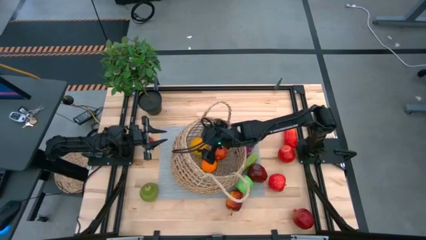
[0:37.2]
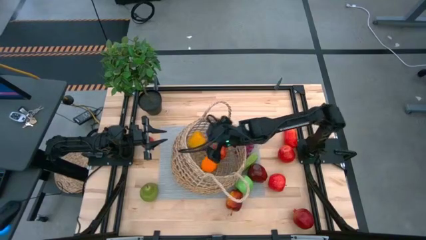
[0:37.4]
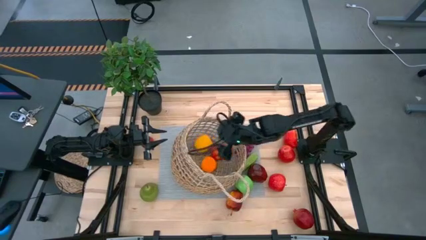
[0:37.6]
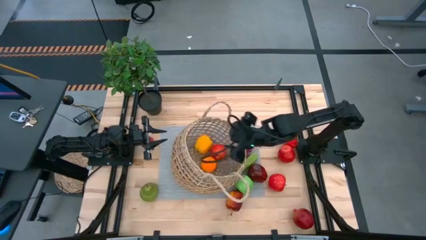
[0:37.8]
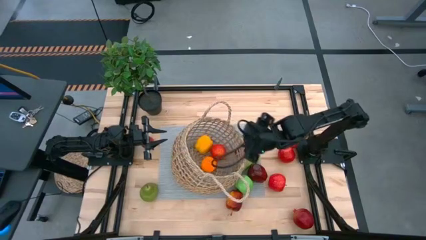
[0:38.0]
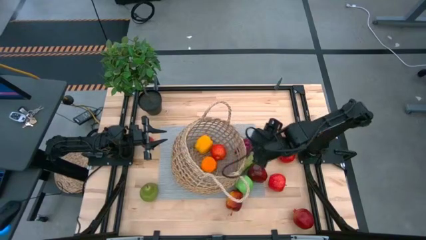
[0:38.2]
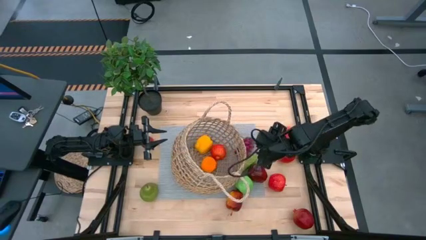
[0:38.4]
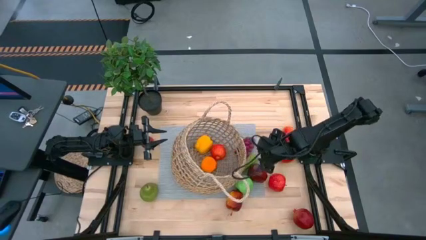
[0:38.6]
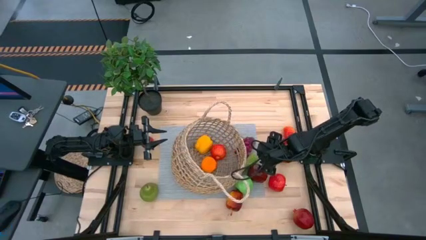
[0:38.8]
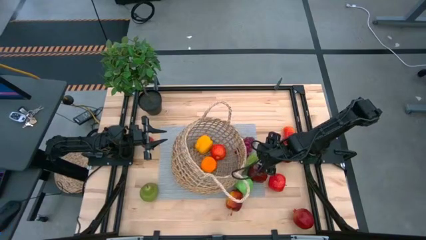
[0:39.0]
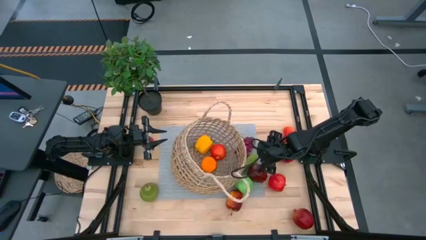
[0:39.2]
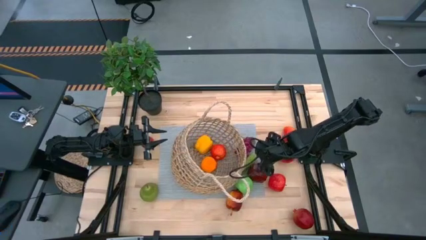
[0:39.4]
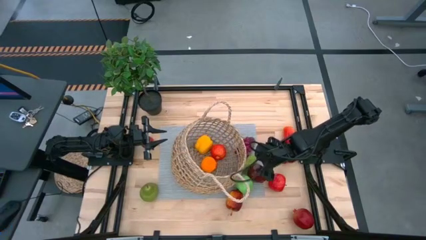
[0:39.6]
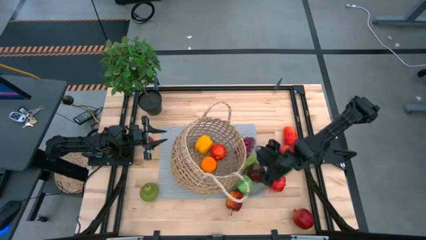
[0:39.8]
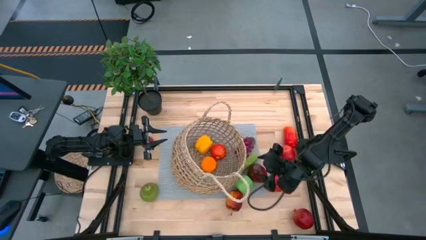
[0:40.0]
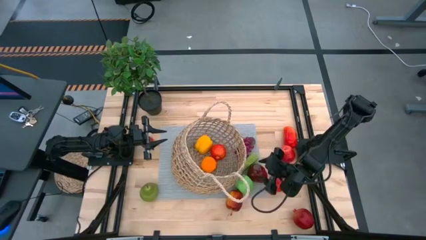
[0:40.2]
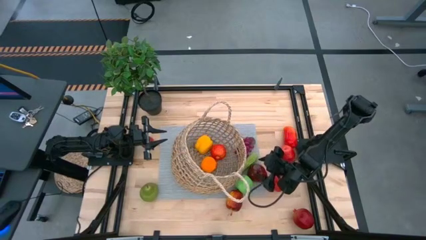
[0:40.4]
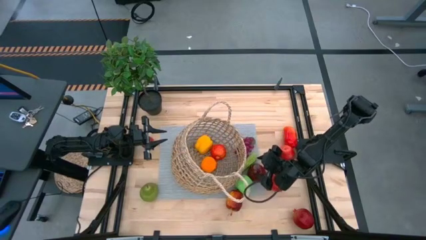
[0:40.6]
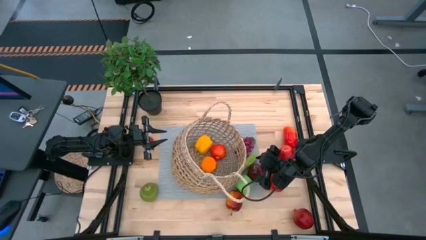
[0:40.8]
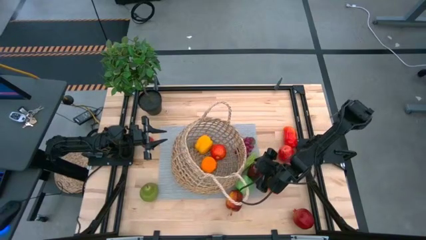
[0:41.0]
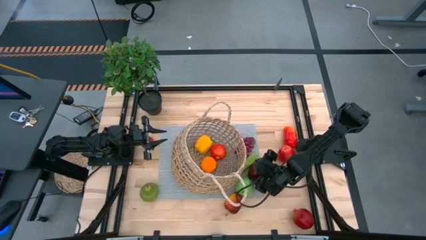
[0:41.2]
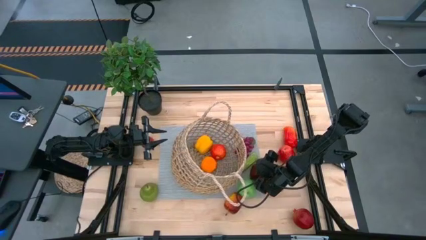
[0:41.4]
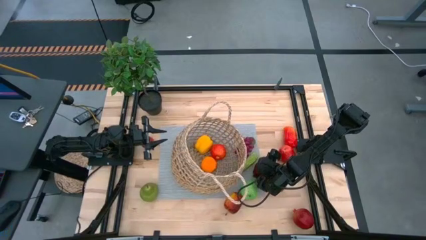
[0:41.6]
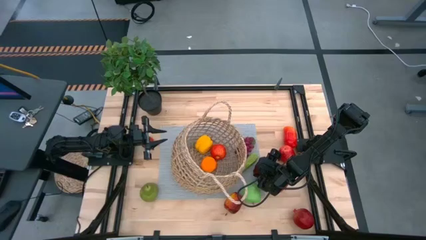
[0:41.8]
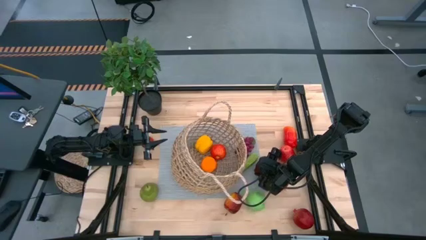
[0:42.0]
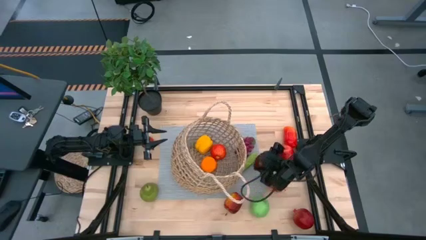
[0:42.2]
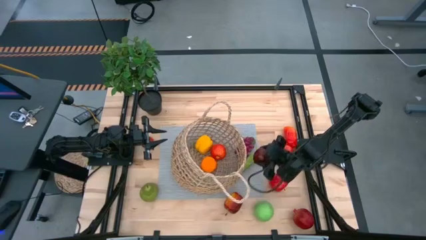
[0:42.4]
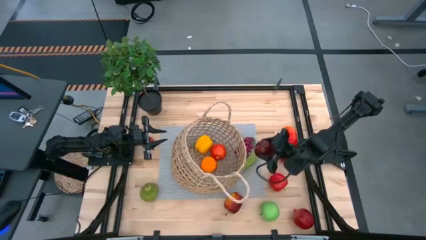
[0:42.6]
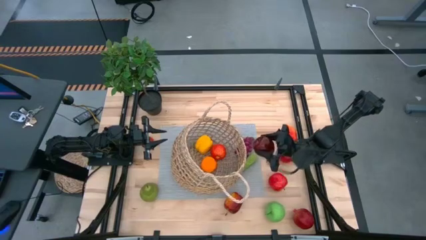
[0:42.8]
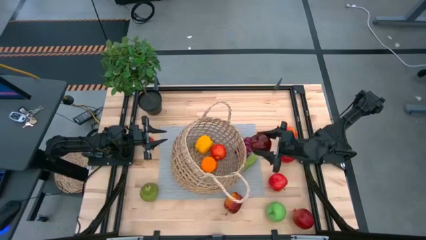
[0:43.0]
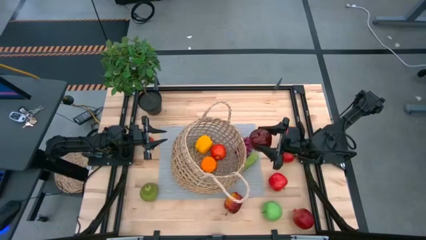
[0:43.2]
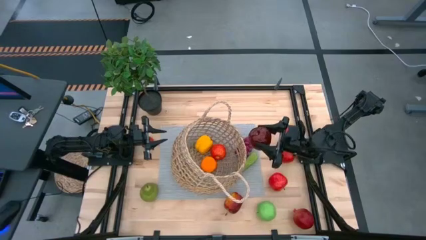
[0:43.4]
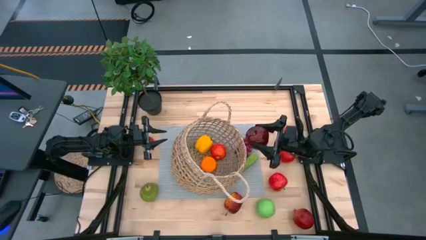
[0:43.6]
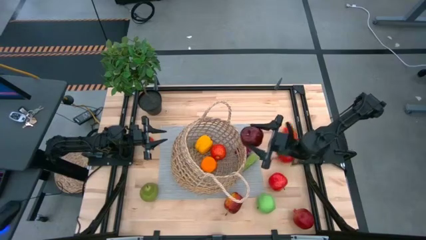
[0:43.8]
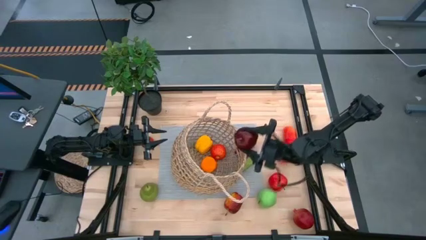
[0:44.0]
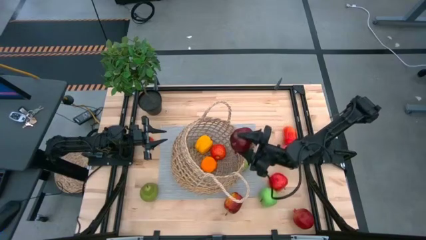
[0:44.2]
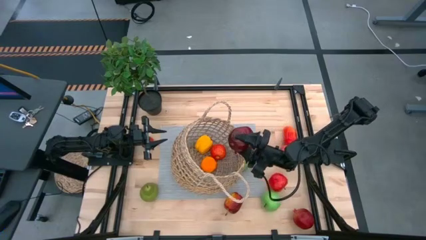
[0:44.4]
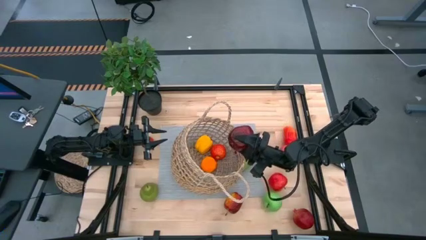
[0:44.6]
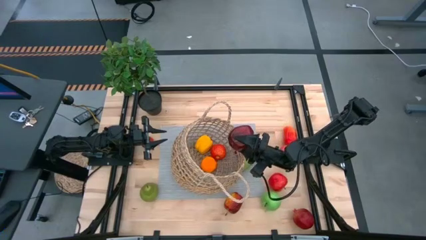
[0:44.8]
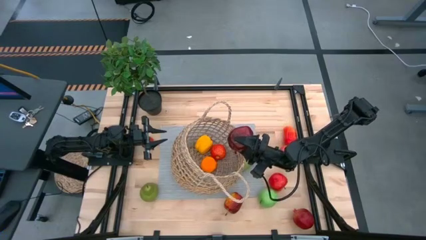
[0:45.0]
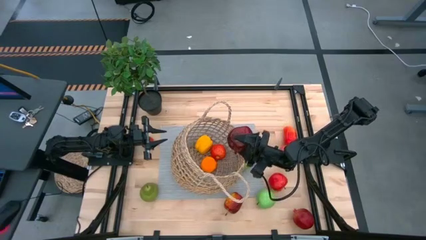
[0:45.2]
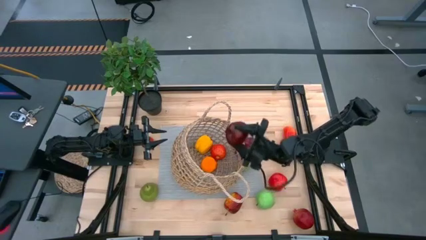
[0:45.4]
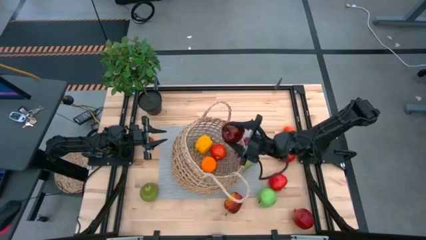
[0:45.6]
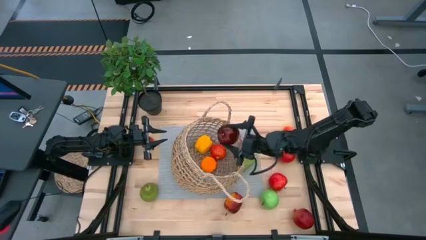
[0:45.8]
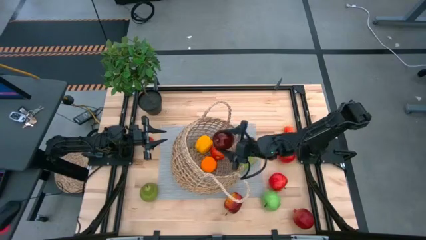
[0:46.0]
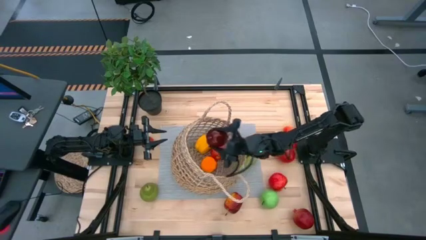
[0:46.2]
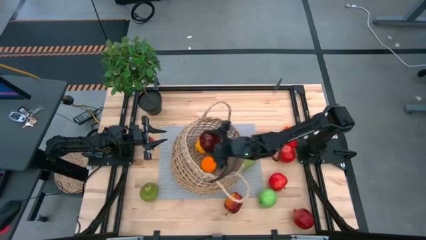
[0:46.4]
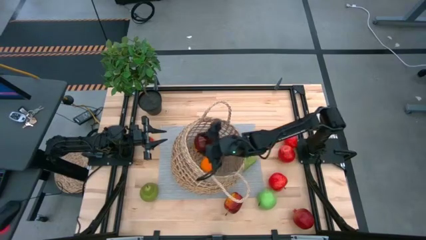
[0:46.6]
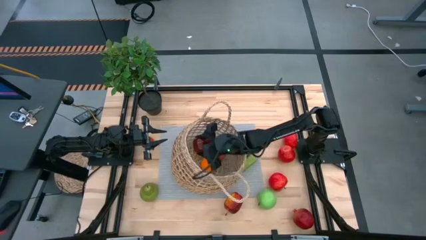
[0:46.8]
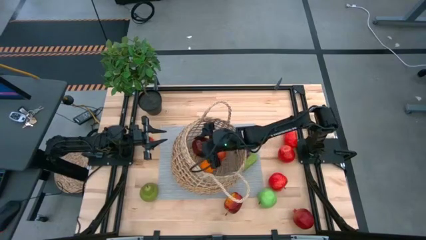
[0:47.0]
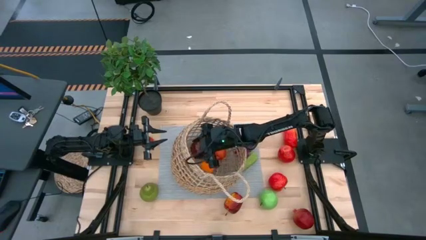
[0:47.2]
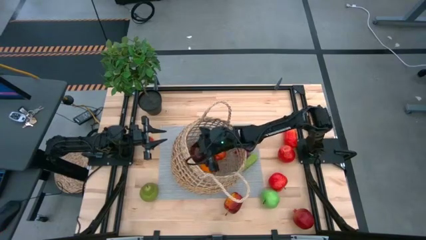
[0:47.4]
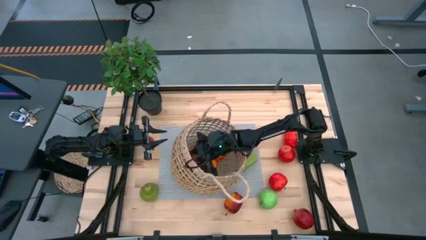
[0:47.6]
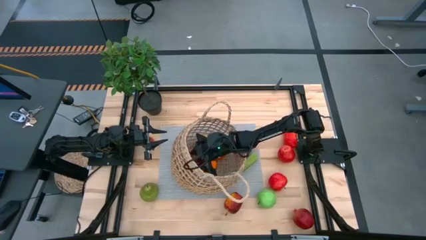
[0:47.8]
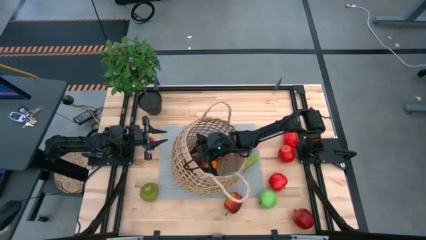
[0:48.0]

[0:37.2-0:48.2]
Task: Build produce basket
Put the dark red apple into the brown basket

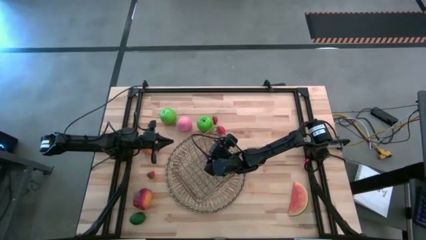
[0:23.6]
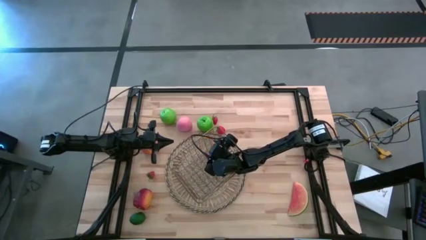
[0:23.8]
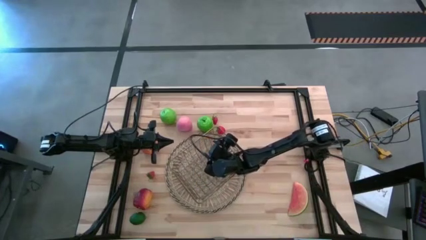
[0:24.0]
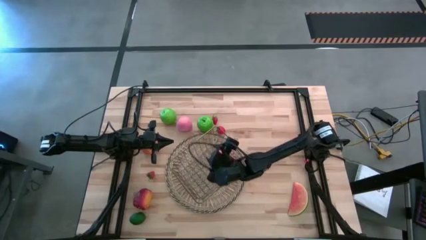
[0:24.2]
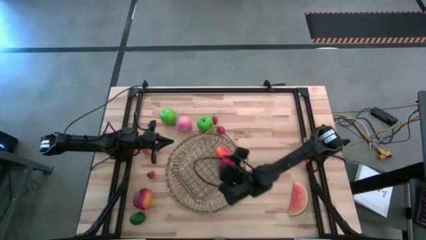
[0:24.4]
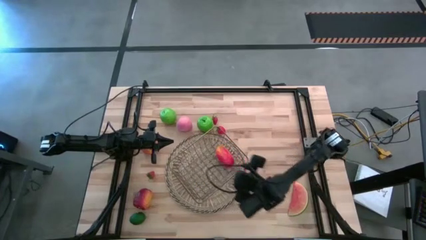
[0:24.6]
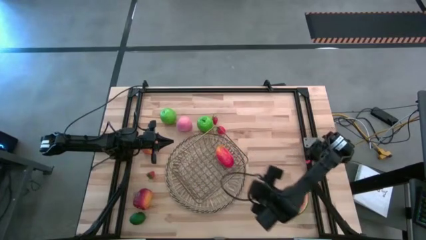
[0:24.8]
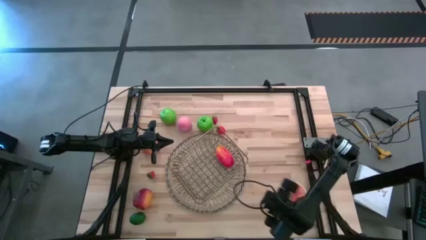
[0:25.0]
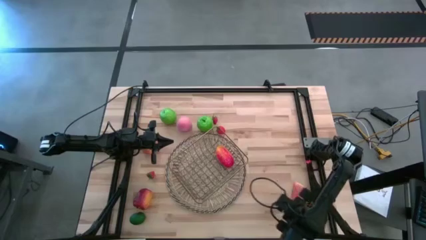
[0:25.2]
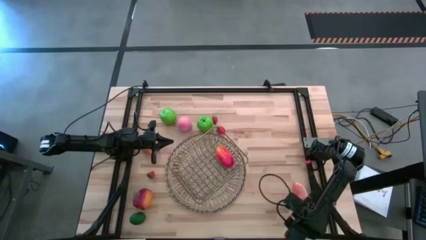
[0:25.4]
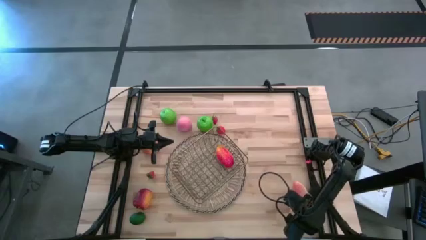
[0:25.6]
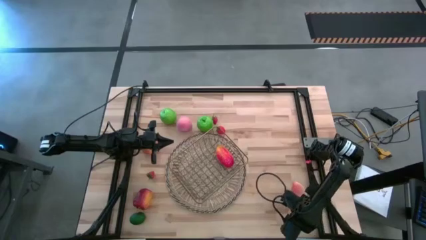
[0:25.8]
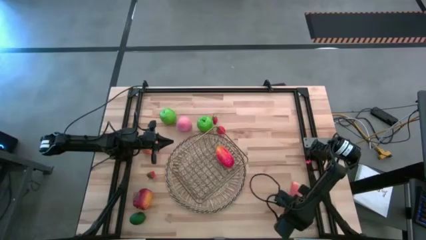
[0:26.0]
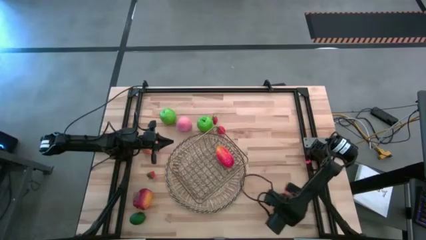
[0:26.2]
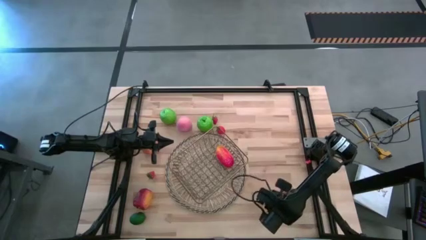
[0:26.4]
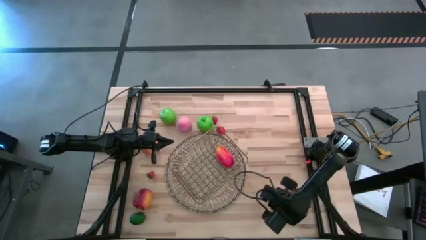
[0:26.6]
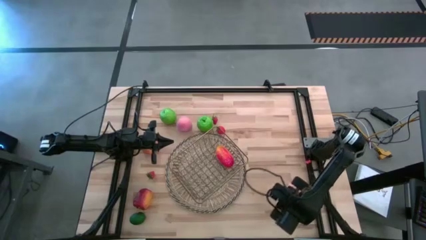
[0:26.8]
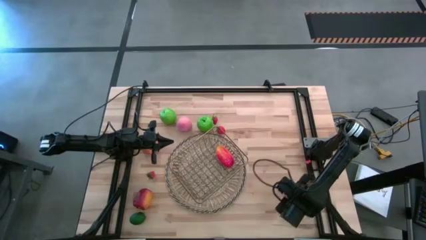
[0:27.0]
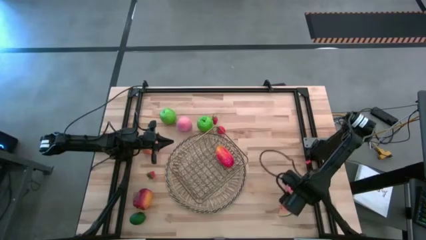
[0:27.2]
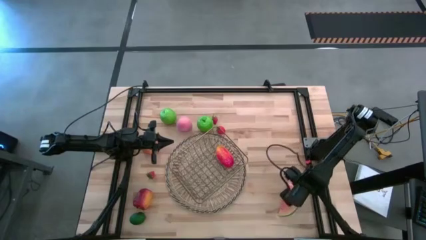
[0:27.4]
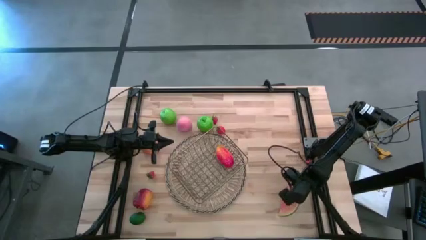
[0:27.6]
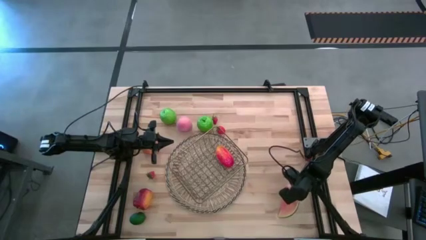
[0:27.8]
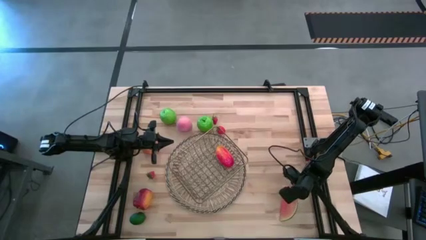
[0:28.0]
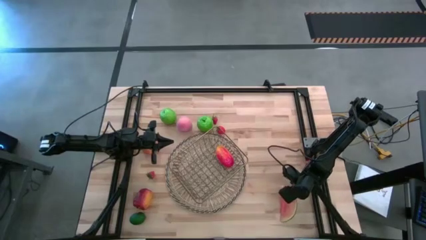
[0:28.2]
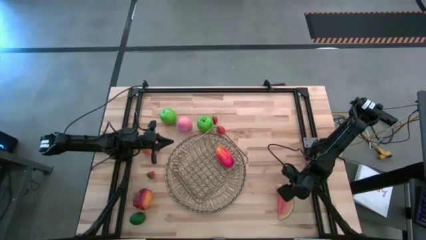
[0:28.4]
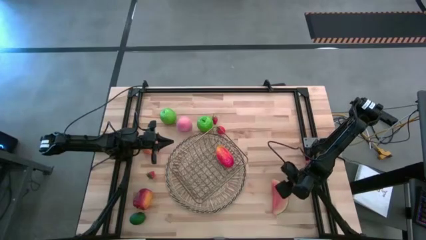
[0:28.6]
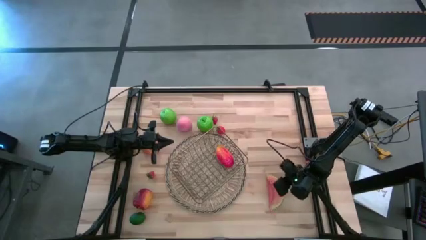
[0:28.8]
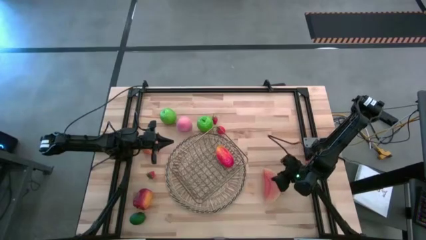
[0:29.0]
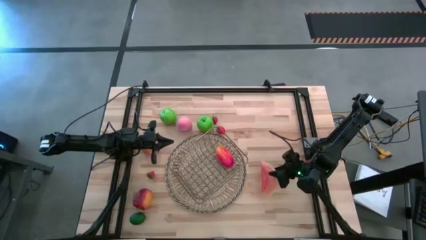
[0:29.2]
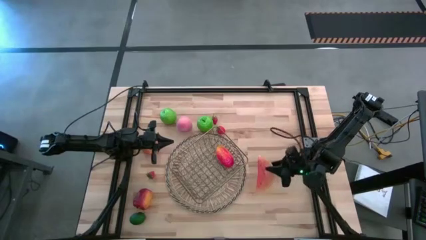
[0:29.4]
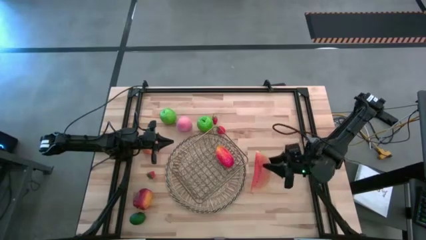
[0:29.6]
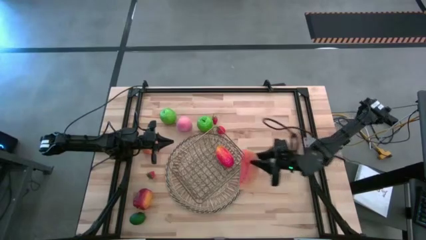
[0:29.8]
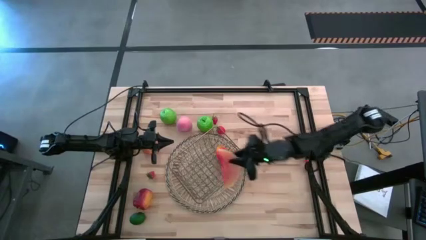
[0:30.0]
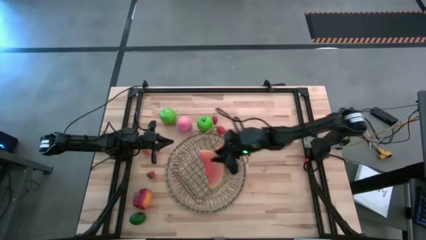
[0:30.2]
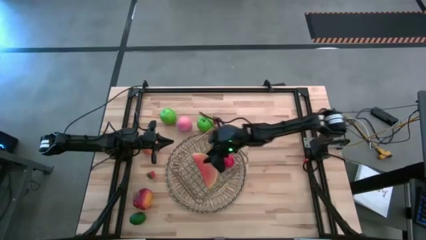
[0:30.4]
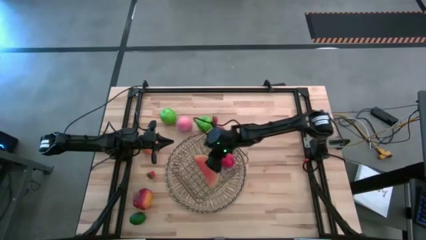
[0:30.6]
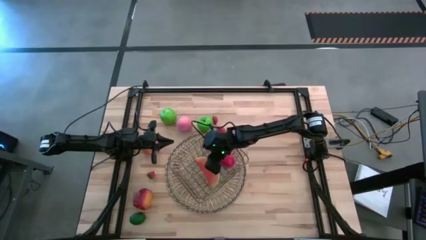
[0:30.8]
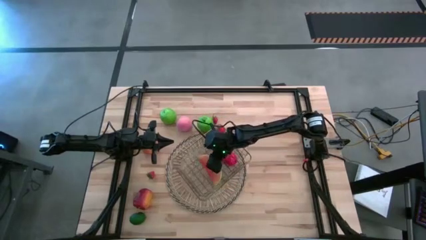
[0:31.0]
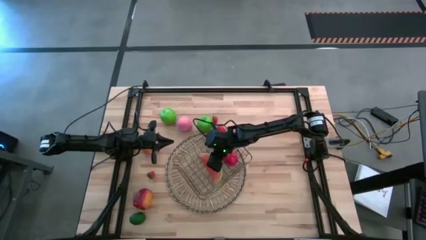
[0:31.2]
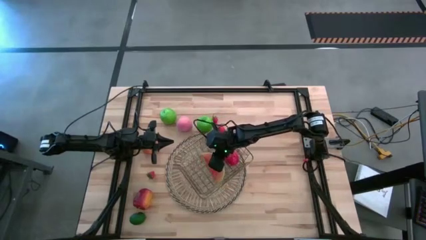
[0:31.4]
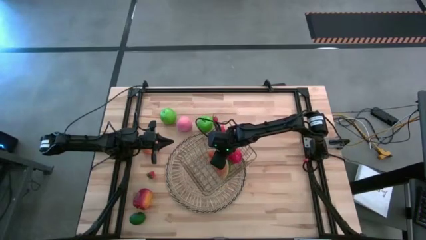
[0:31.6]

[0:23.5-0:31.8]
Task: Build produce basket
Put the watermelon into the gold wire basket
